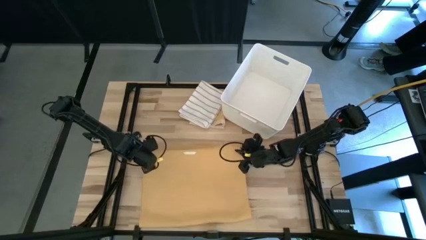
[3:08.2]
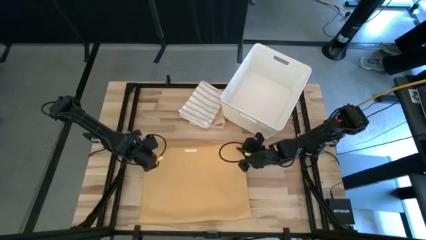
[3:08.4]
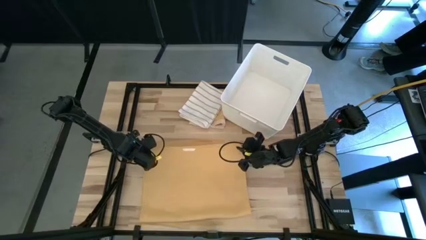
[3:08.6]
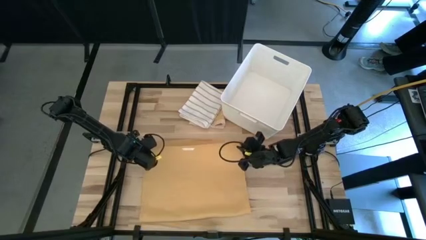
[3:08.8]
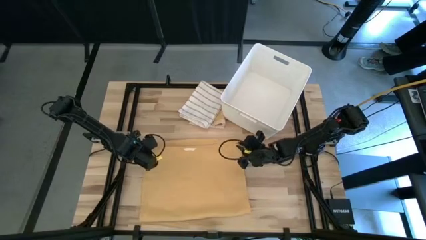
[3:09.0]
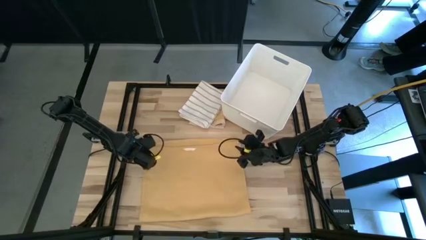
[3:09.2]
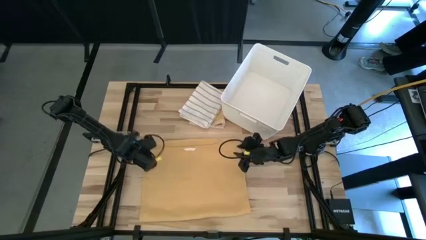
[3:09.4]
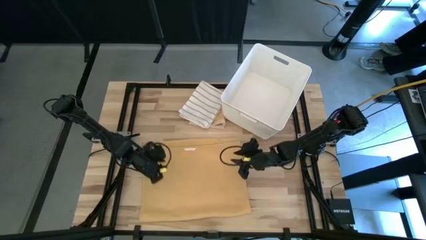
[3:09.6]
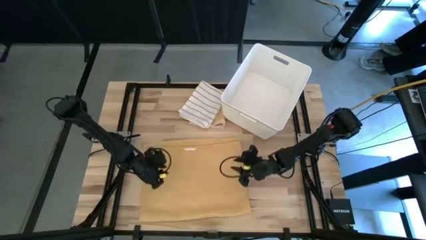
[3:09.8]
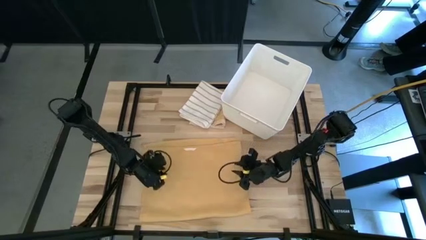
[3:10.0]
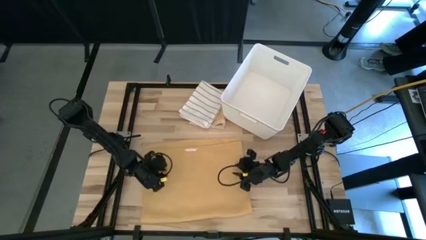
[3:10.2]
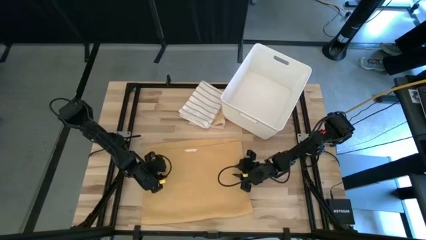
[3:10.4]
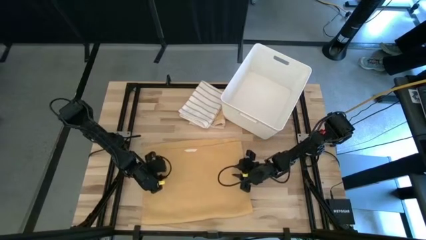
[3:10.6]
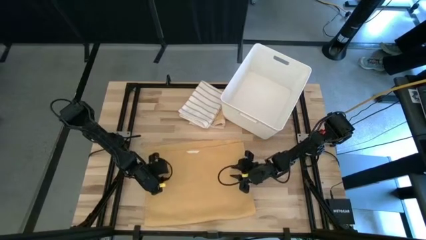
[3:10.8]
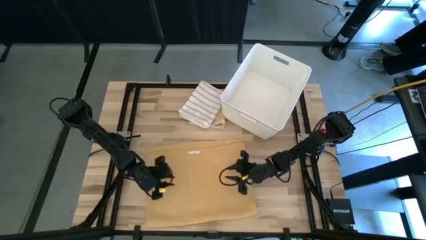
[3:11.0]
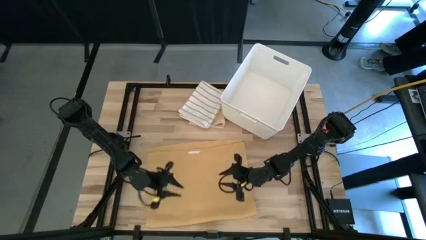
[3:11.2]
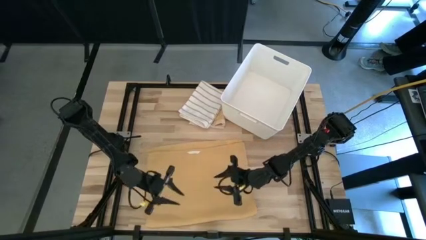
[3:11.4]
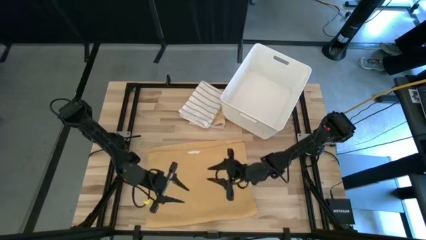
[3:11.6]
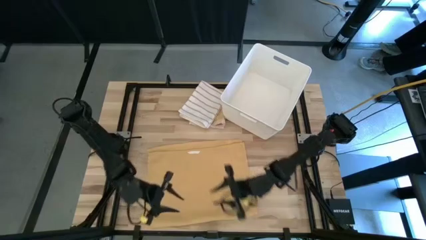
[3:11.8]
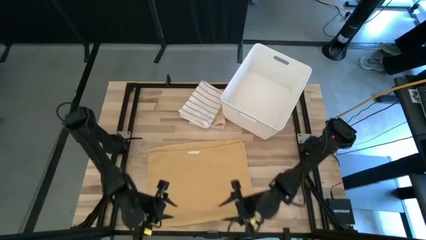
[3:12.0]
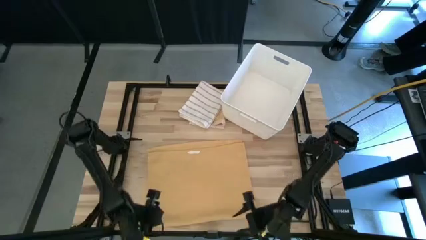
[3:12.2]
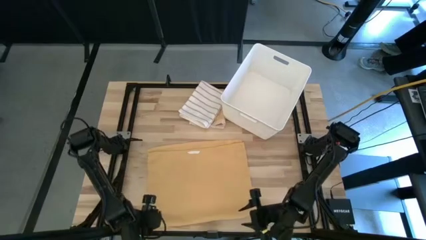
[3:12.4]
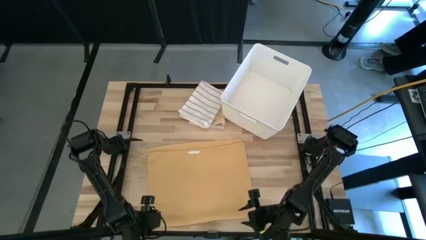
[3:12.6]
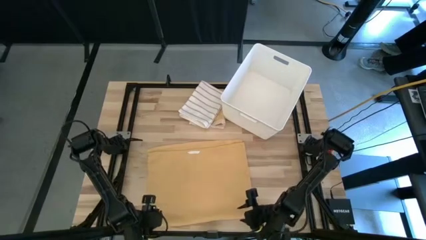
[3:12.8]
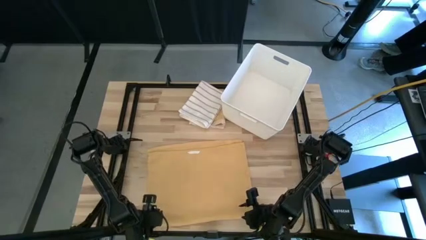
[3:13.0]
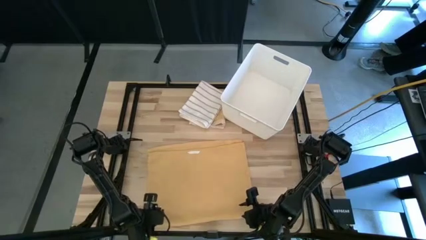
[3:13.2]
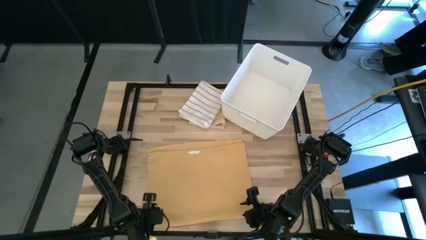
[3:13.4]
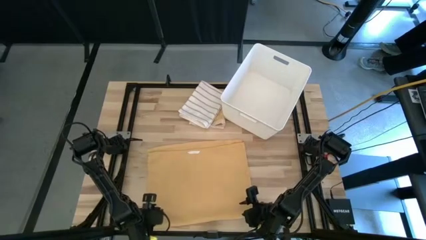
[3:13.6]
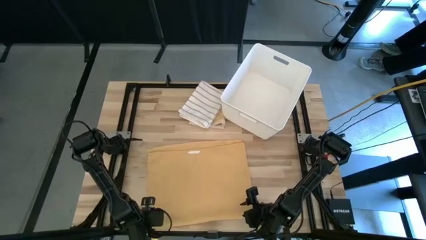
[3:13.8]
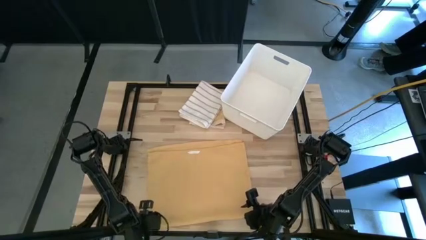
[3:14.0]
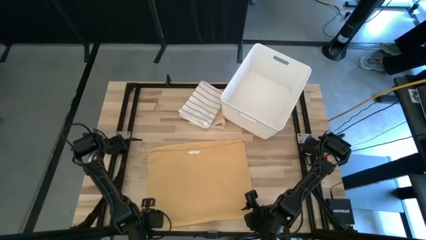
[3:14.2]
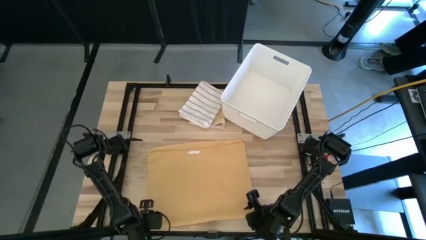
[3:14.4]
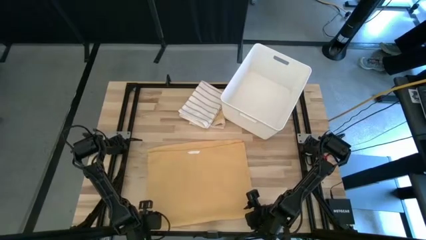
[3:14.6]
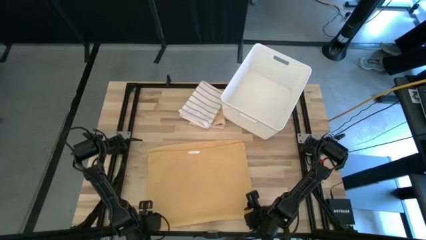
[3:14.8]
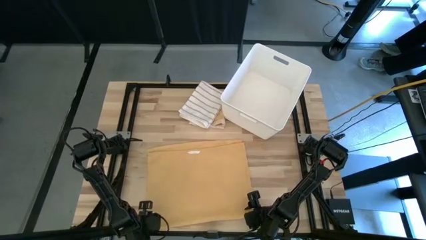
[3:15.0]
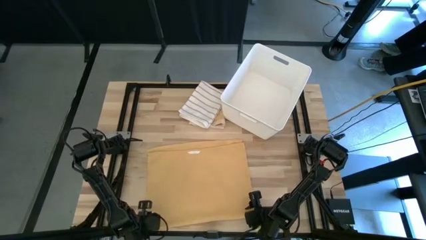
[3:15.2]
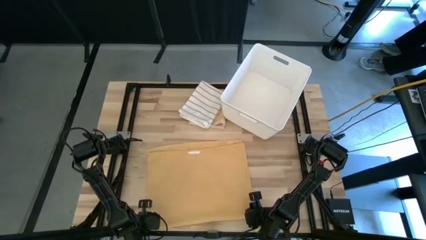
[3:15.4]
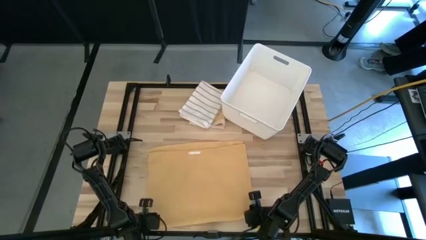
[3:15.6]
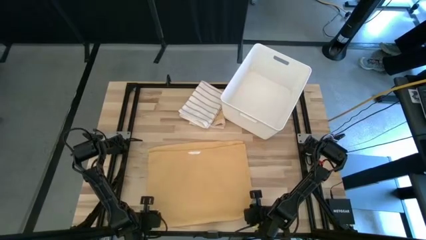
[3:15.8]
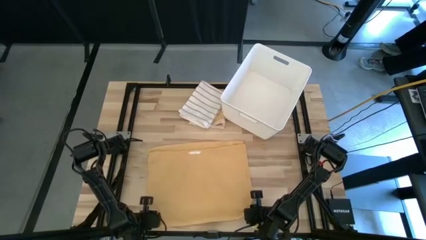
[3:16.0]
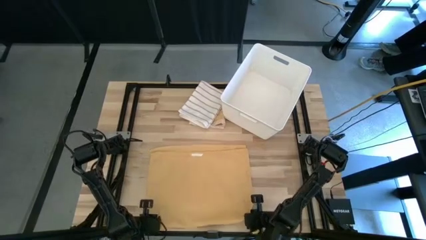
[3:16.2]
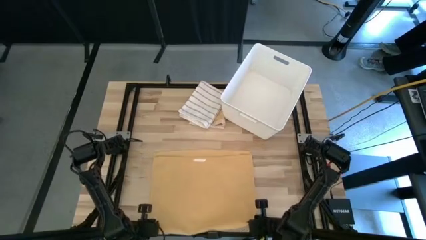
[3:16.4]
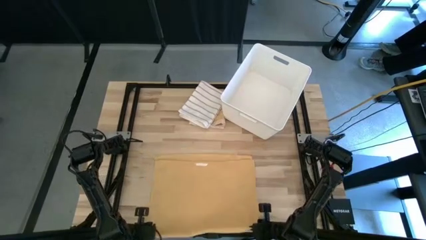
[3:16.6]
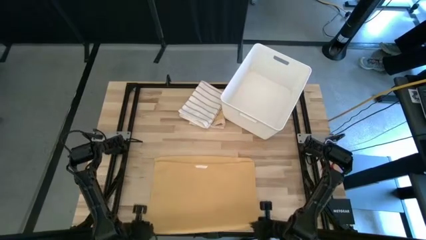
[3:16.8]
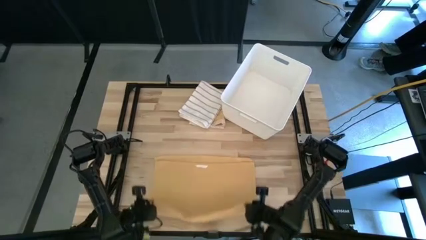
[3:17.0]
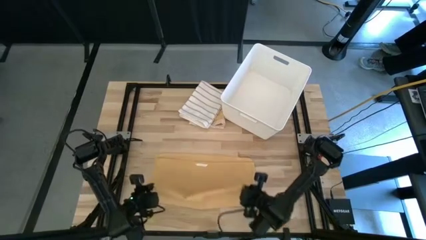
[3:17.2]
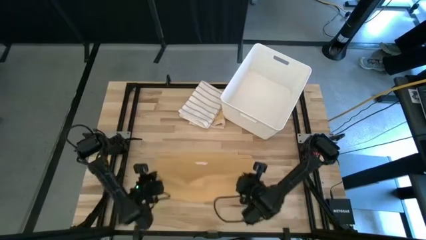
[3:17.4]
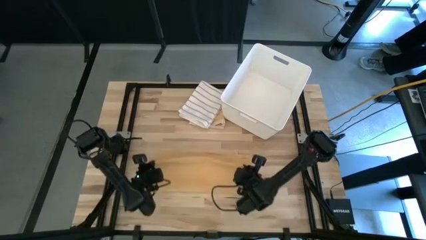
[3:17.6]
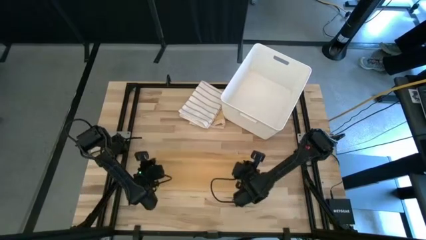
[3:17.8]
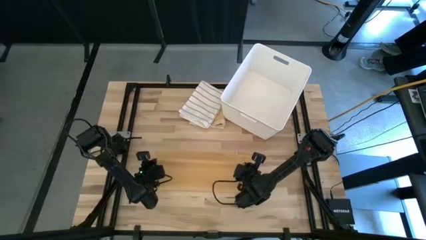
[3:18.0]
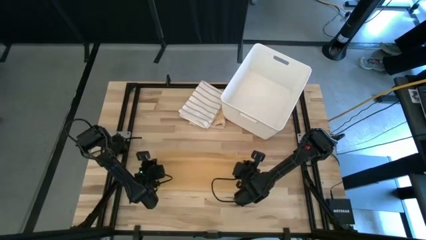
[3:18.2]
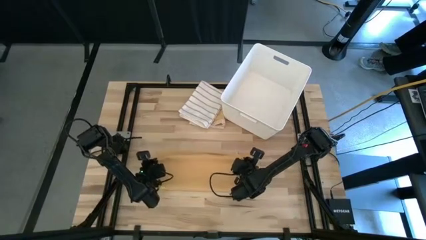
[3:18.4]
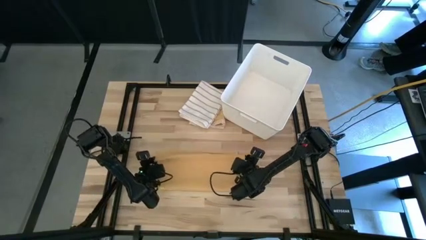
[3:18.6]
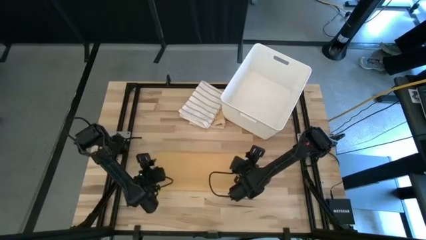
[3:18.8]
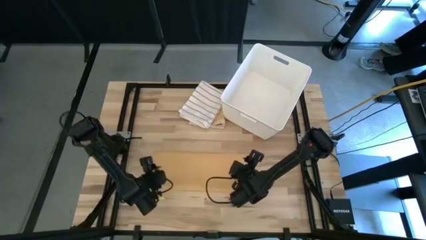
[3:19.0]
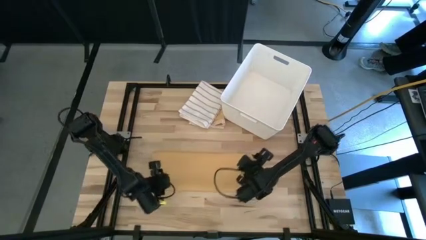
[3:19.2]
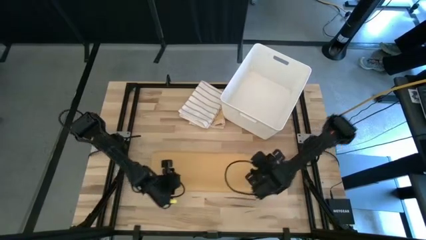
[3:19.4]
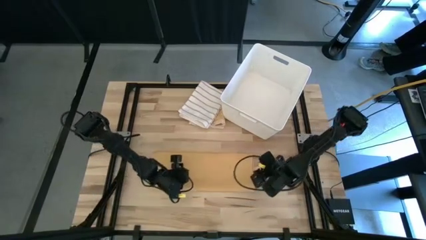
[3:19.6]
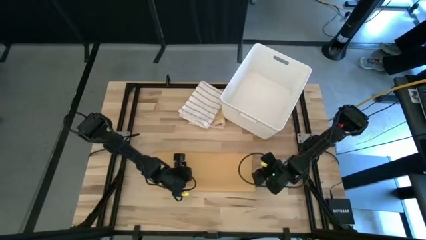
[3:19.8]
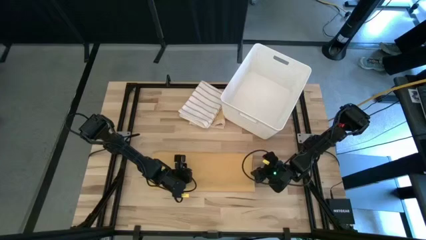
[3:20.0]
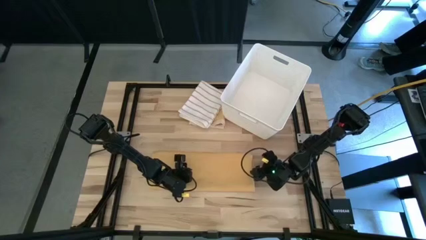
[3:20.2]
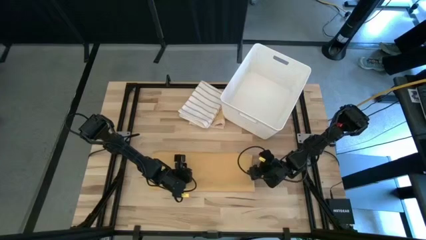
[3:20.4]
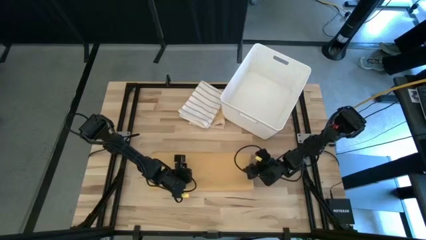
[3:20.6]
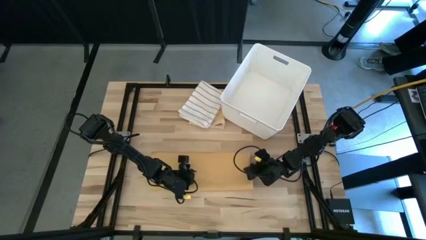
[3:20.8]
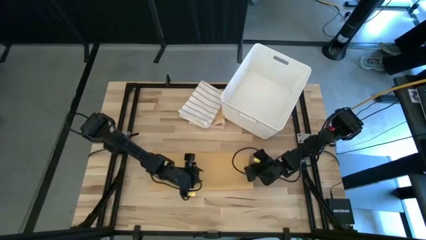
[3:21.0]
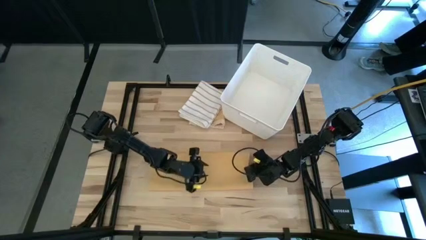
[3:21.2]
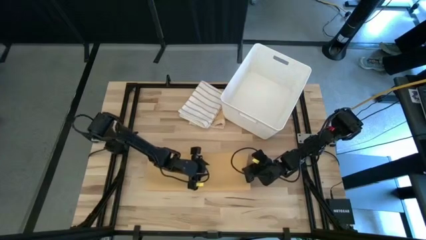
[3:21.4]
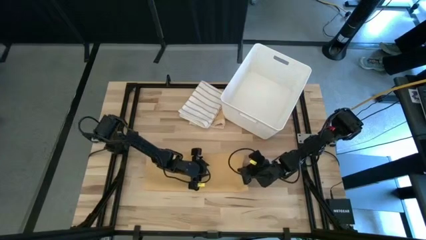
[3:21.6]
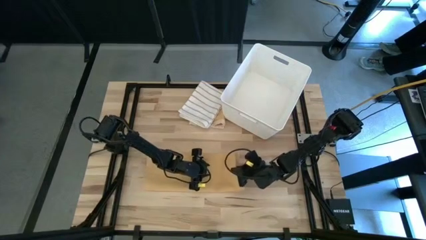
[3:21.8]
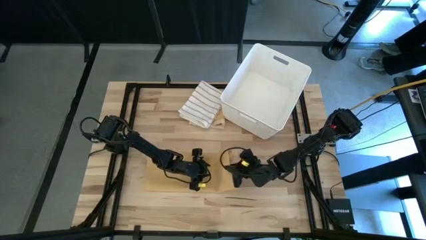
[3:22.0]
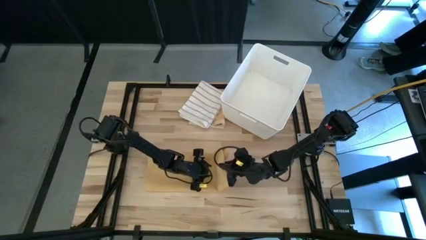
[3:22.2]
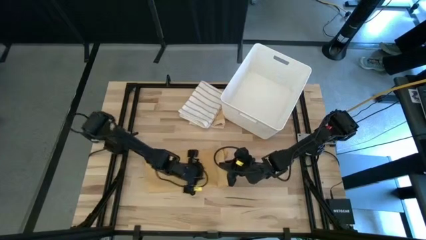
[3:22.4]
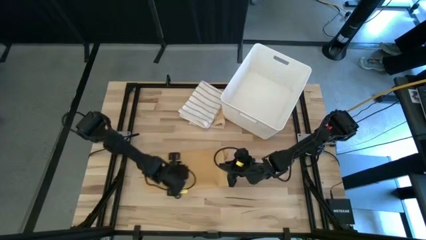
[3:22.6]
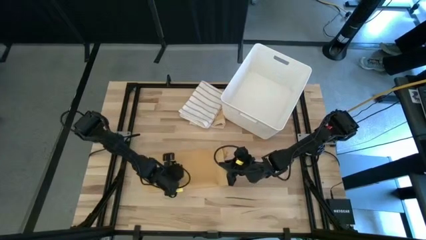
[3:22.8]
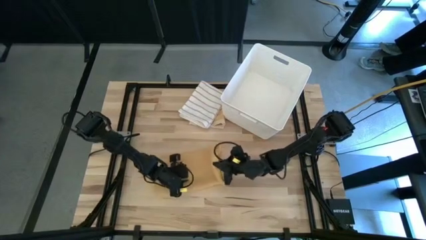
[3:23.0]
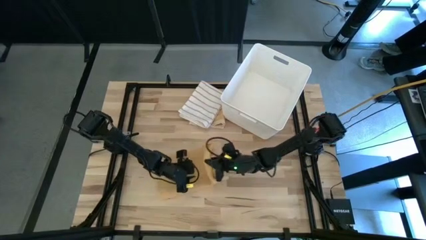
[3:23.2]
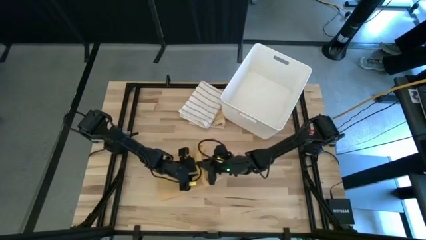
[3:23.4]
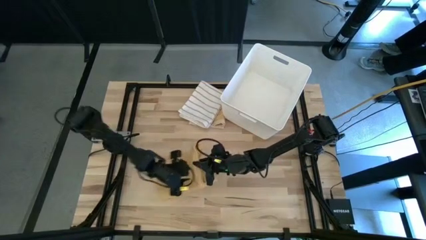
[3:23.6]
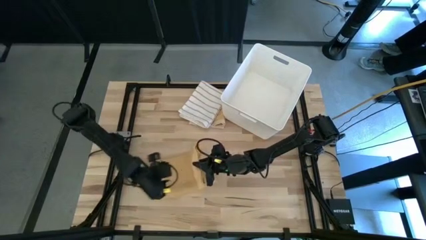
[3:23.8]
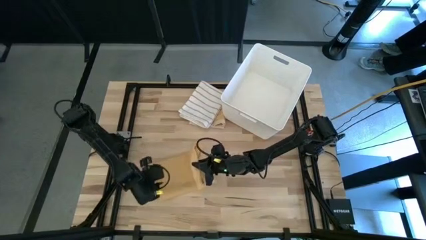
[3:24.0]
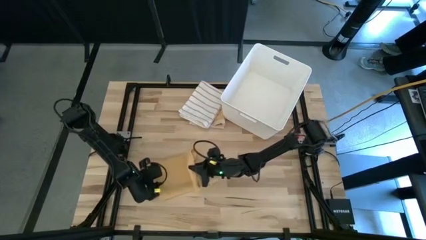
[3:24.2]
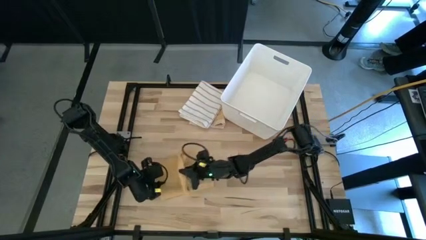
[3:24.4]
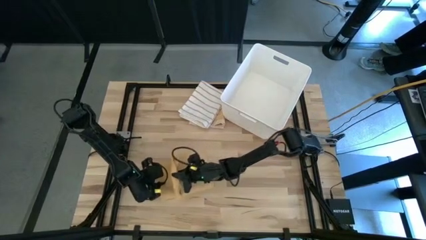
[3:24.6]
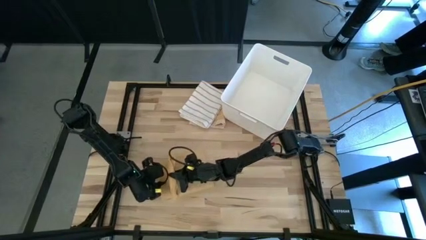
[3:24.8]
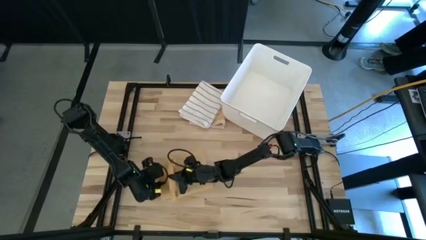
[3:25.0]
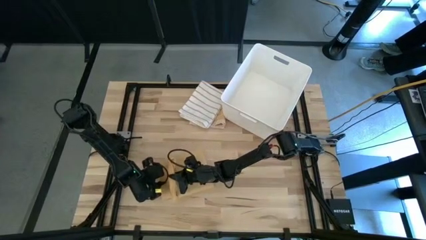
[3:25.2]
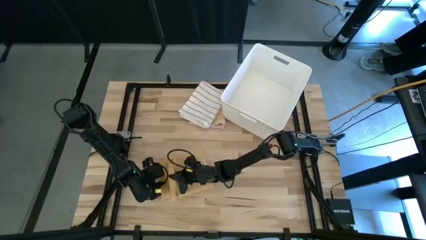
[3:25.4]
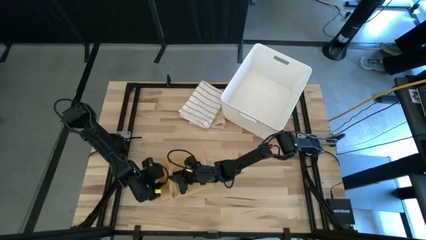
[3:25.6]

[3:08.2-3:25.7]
Task: Fold towel
Fold the yellow towel
